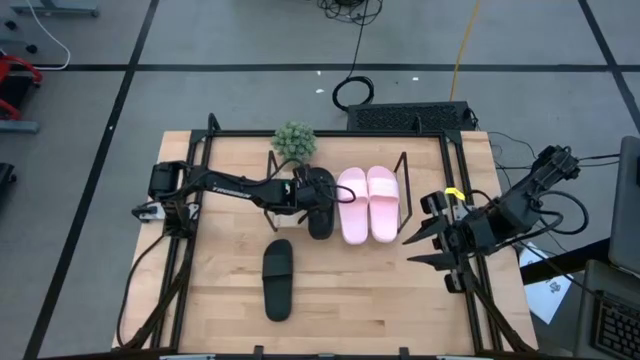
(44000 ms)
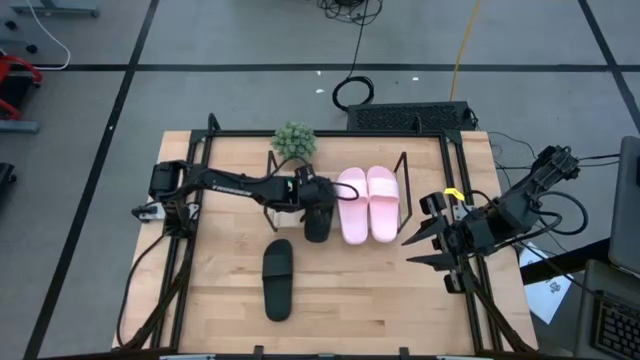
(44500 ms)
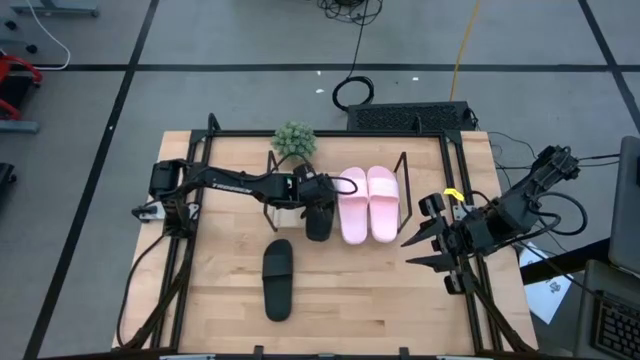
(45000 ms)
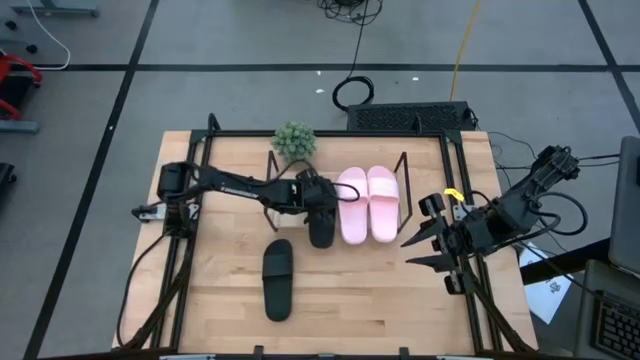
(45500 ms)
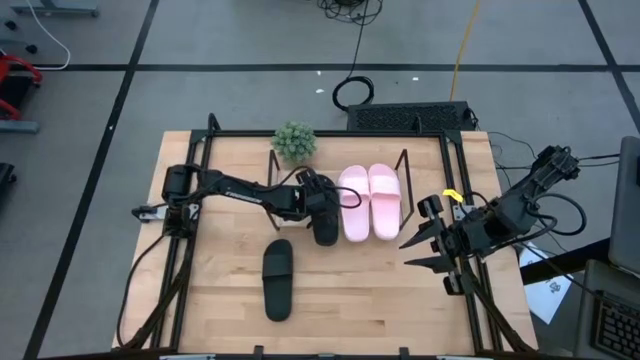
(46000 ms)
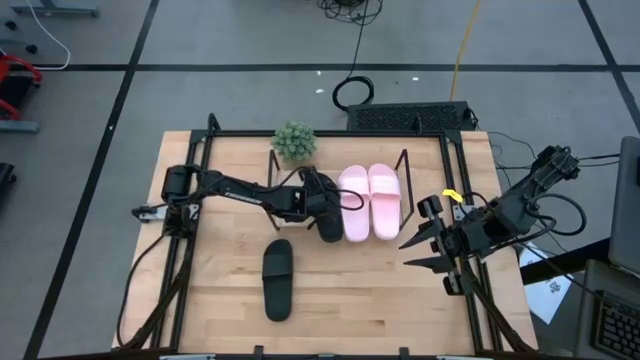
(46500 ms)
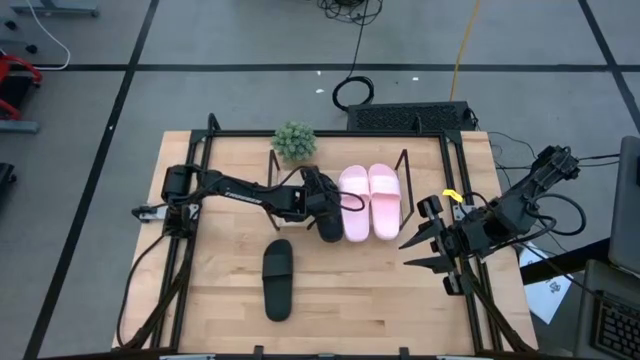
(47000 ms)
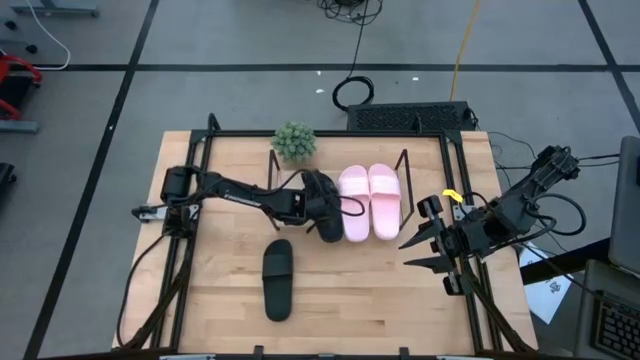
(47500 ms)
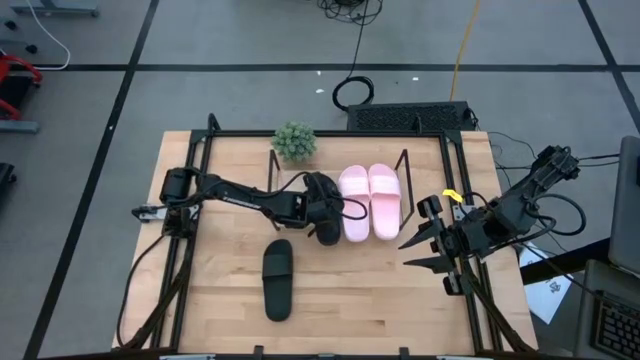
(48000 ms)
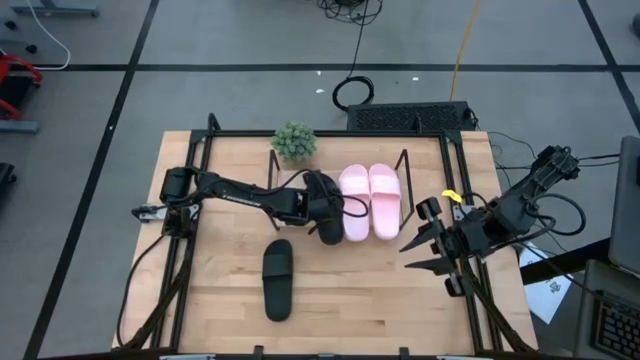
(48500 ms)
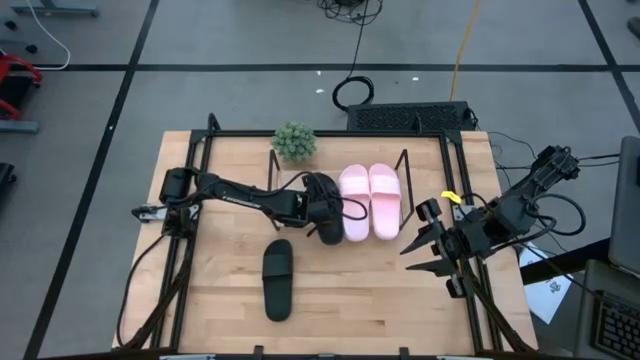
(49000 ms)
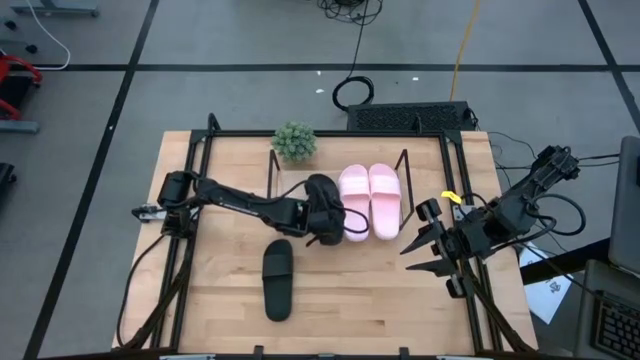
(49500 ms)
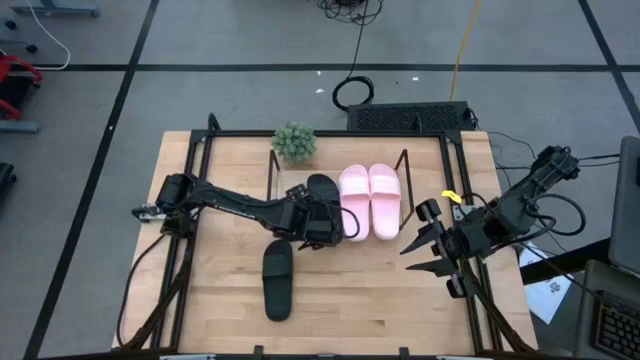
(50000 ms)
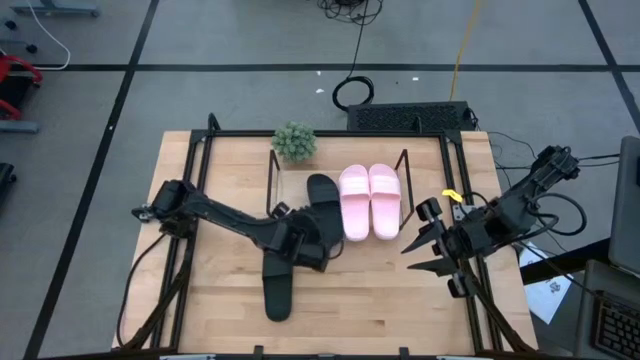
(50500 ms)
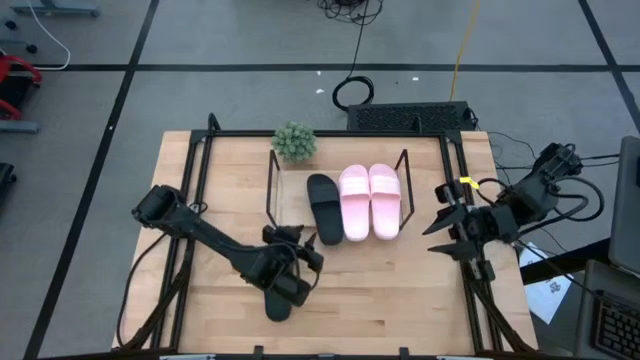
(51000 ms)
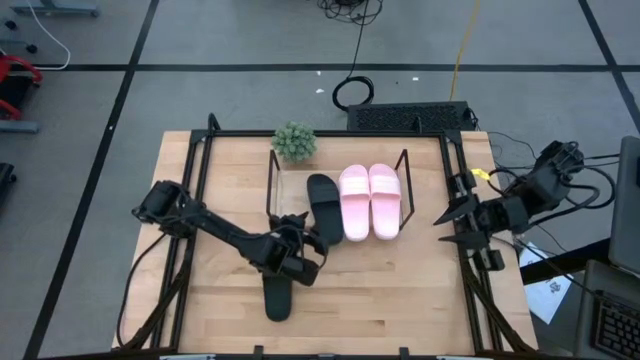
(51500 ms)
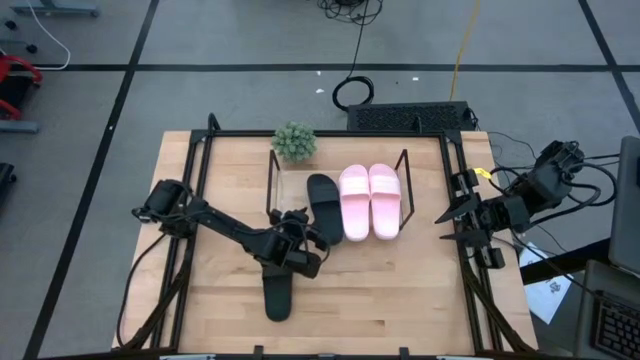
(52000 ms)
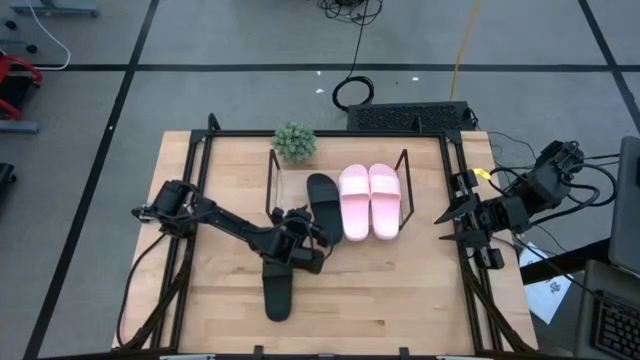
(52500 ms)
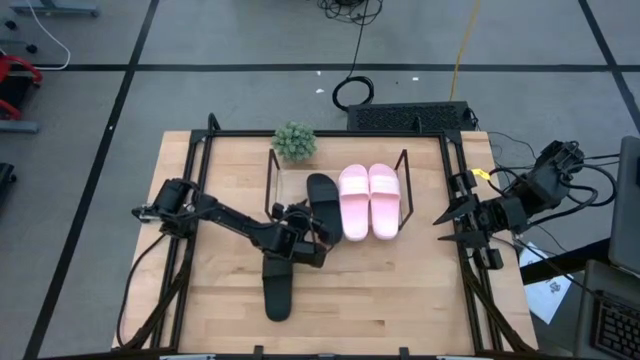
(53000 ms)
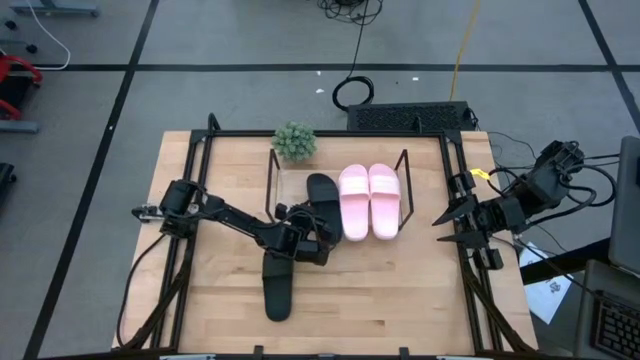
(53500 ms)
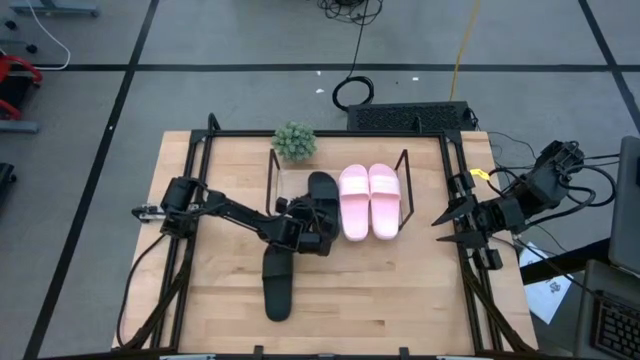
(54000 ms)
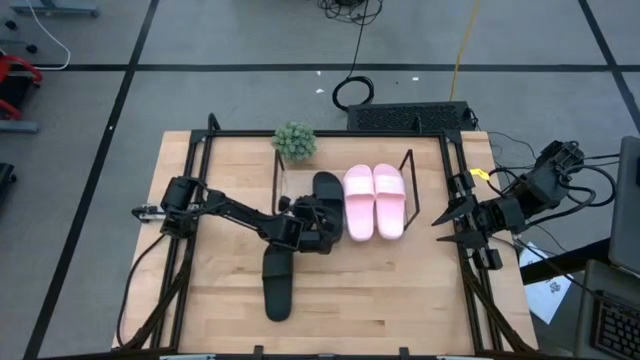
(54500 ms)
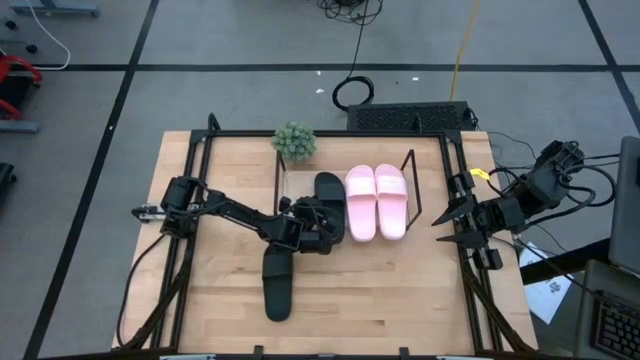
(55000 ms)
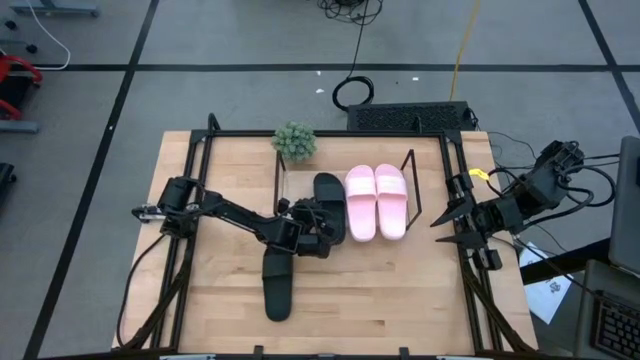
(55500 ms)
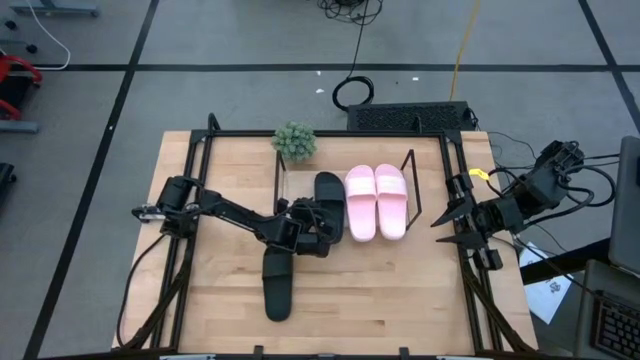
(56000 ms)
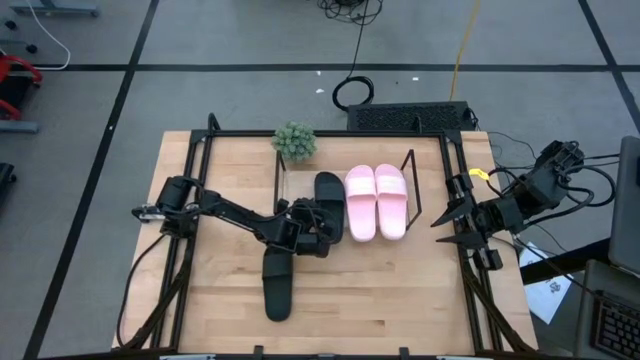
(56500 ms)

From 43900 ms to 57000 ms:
Task: Pick and place slides into the shelf
Put the right black slide on the shelf

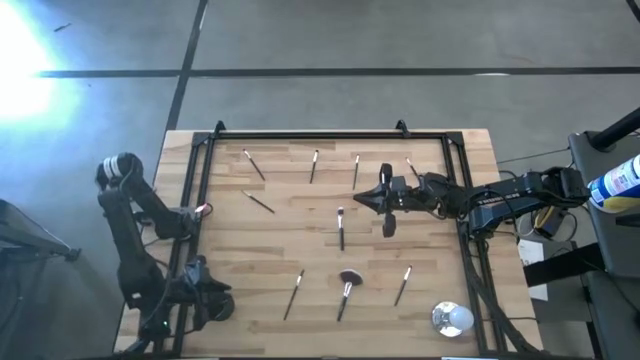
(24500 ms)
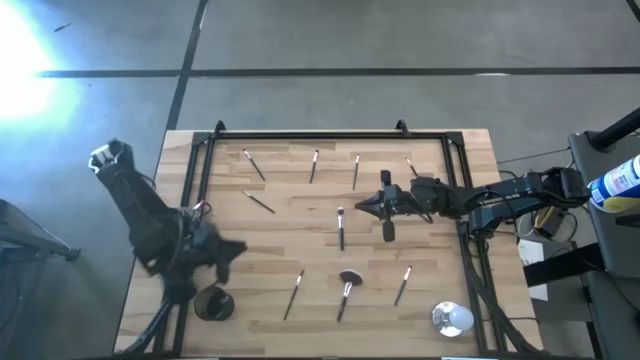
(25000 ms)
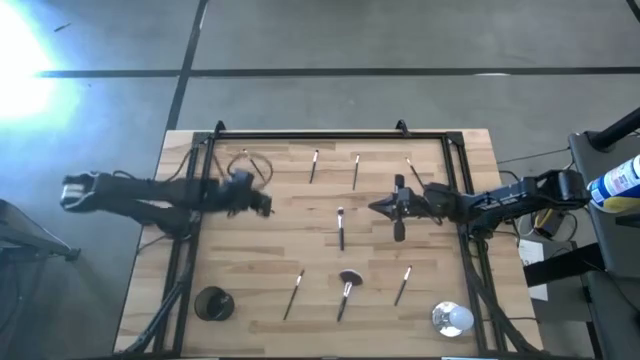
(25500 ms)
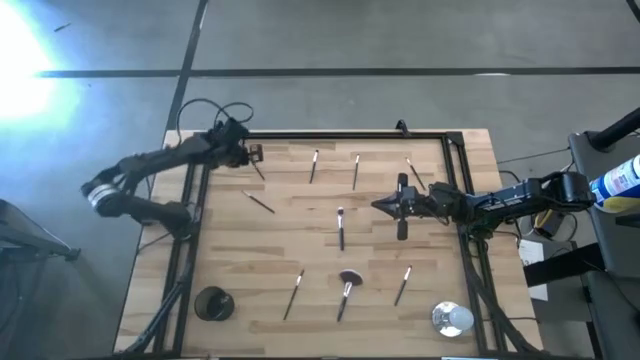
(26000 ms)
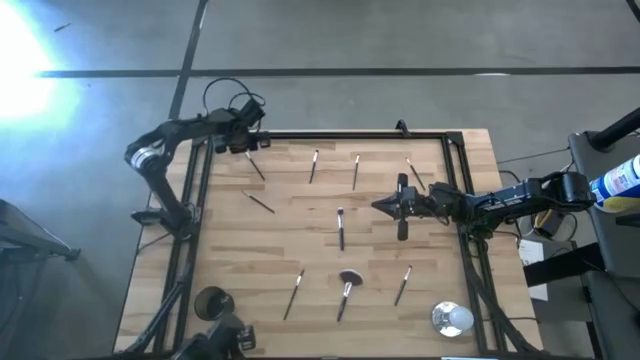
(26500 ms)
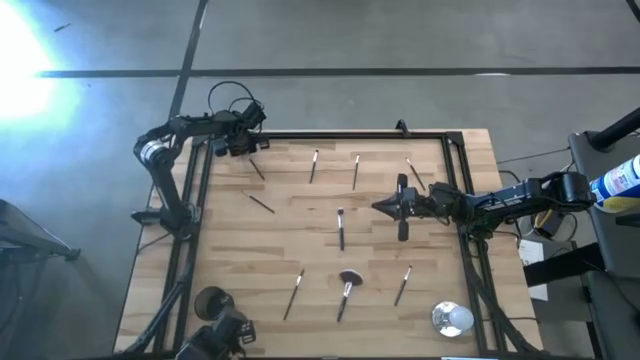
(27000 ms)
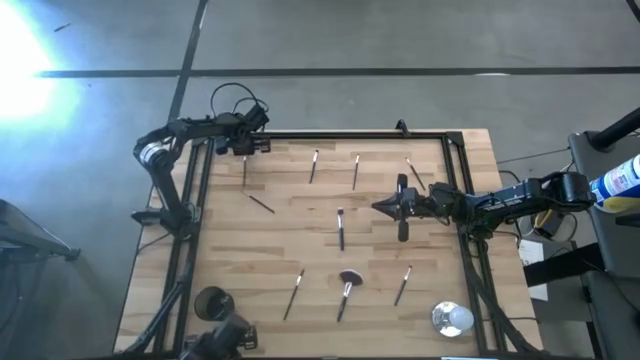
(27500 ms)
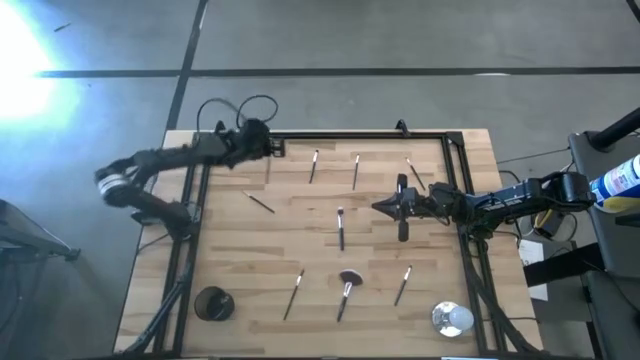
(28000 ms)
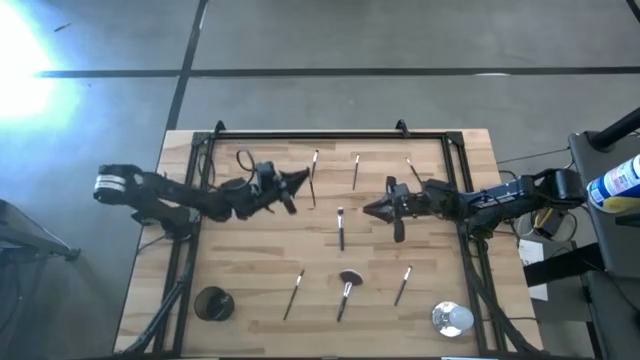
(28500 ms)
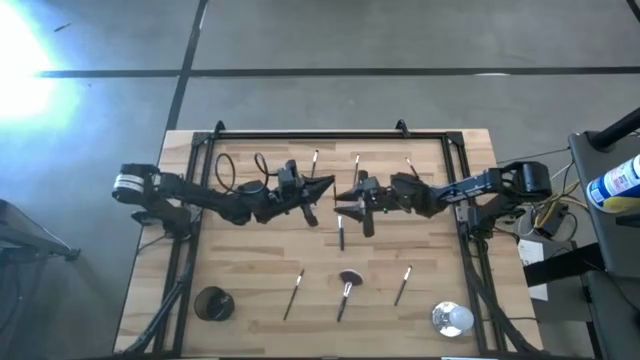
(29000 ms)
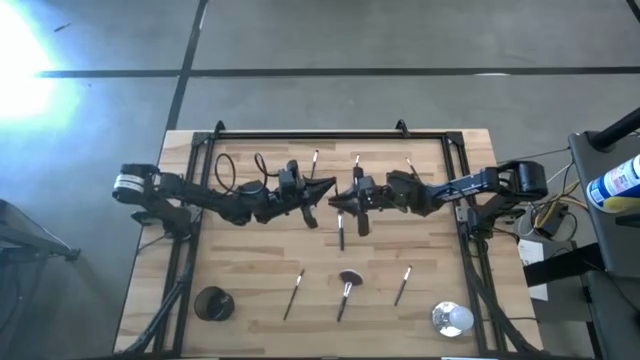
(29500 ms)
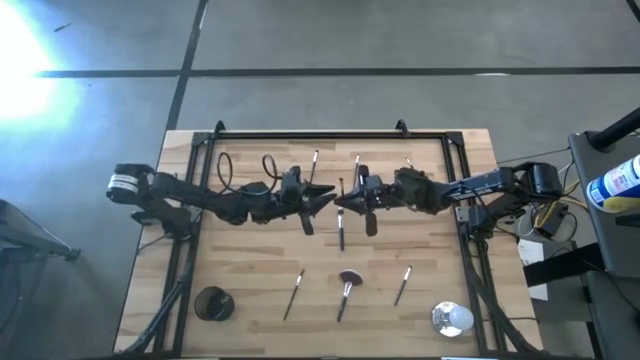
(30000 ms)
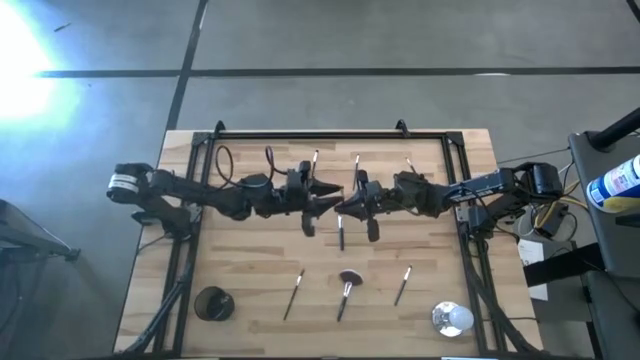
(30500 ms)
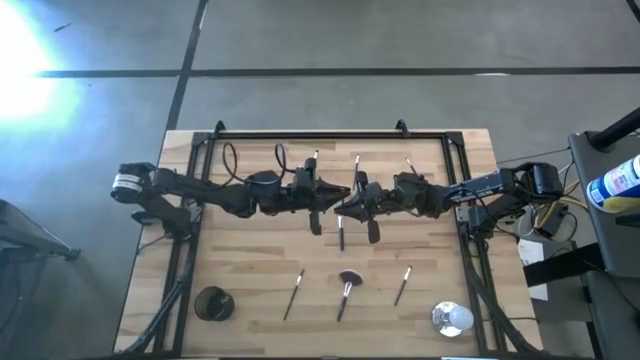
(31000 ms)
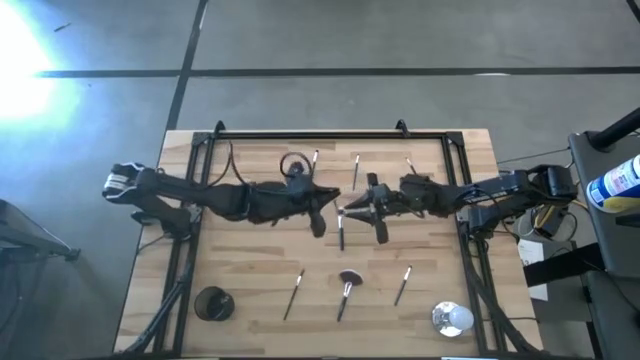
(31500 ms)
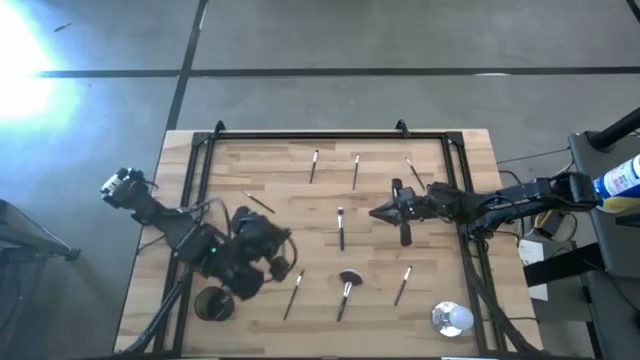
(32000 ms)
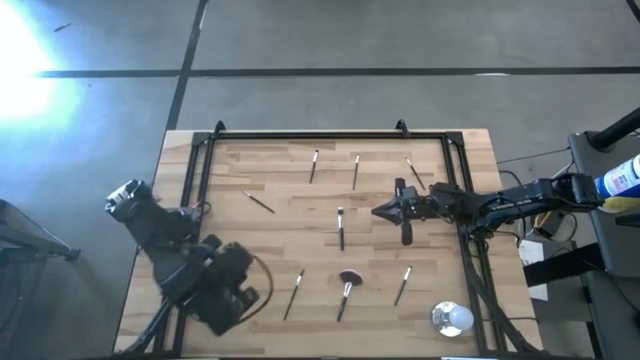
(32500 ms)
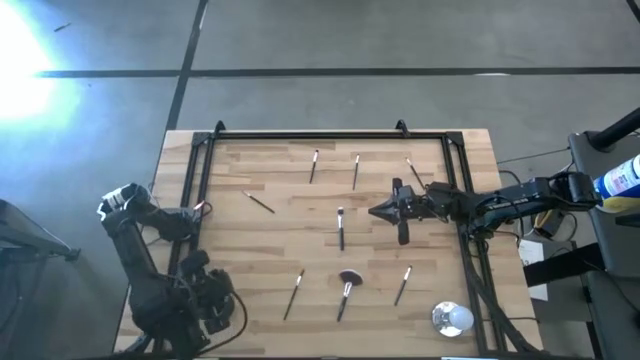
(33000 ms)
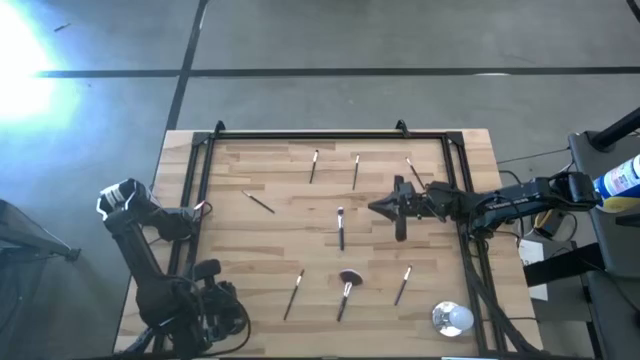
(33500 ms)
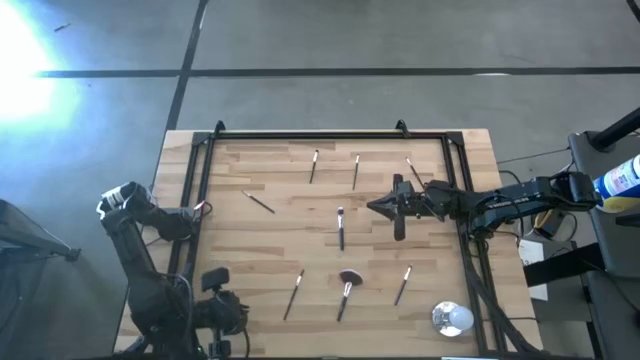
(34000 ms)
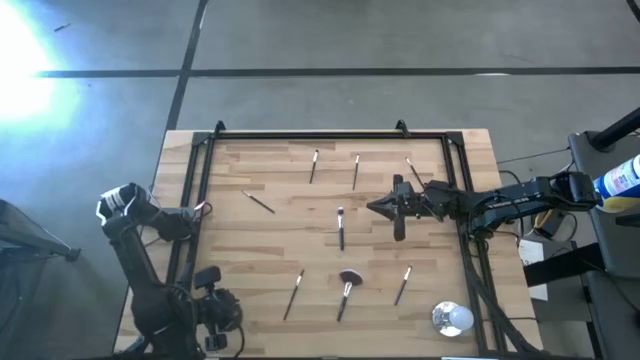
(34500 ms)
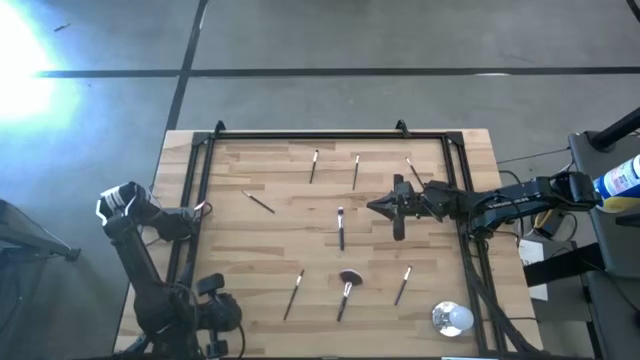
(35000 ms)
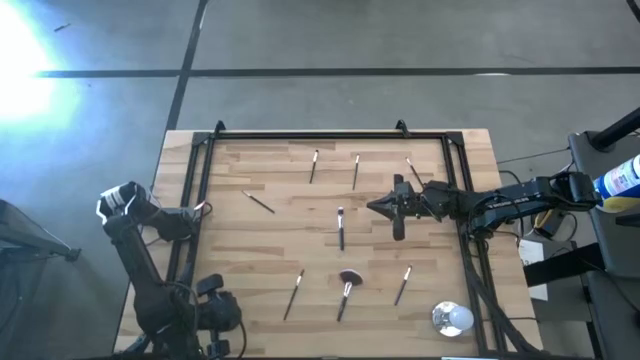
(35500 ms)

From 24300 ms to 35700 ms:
Task: Pick & Place Makeup Brushes
Put the black eyeshadow brush into the makeup holder
